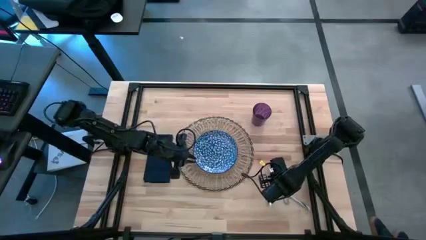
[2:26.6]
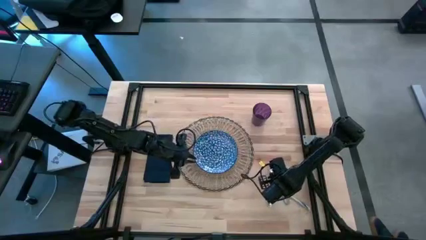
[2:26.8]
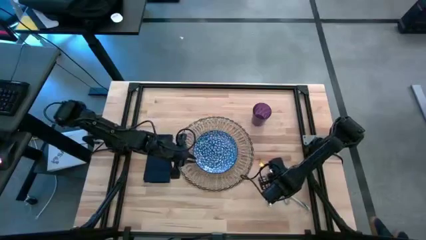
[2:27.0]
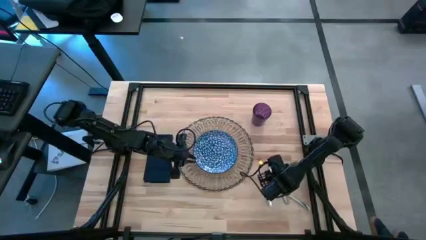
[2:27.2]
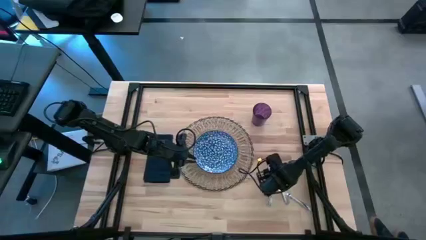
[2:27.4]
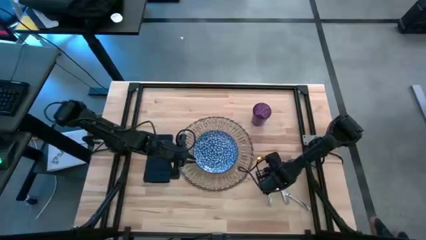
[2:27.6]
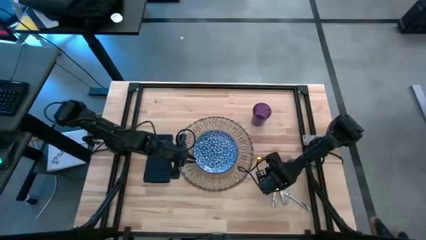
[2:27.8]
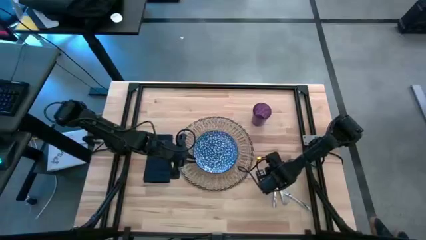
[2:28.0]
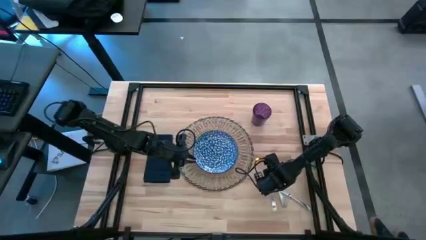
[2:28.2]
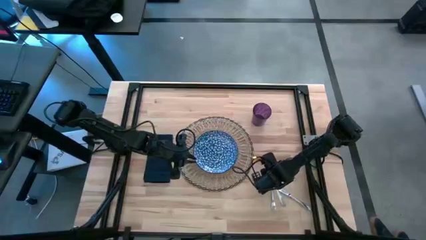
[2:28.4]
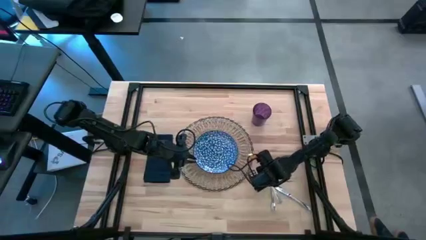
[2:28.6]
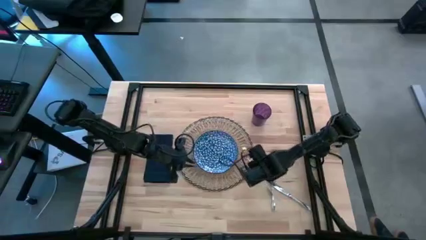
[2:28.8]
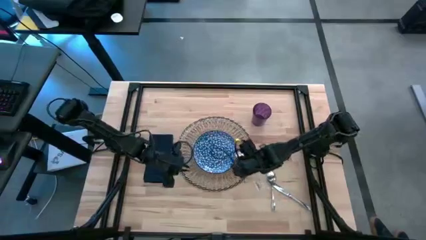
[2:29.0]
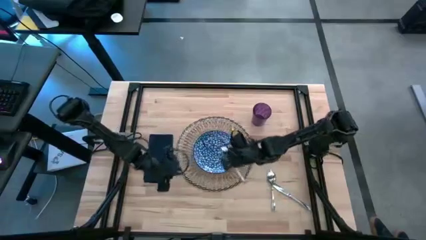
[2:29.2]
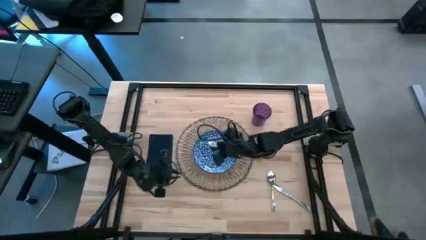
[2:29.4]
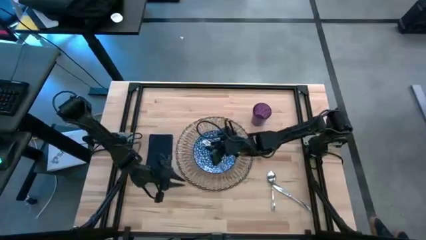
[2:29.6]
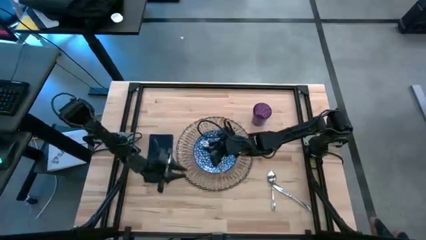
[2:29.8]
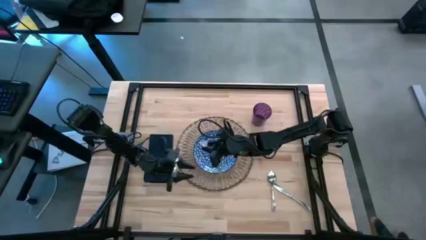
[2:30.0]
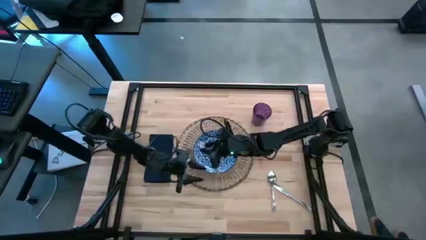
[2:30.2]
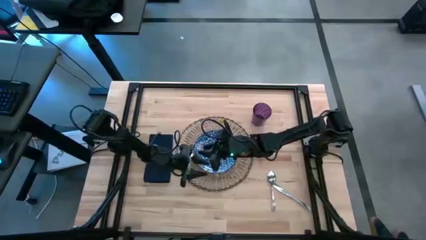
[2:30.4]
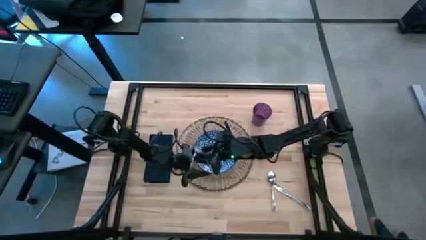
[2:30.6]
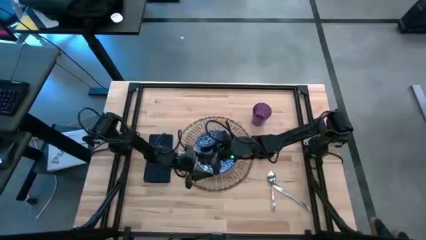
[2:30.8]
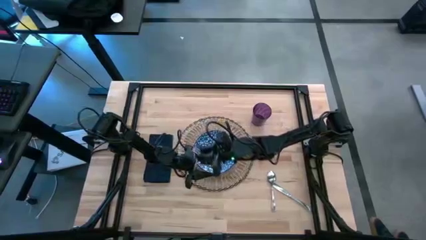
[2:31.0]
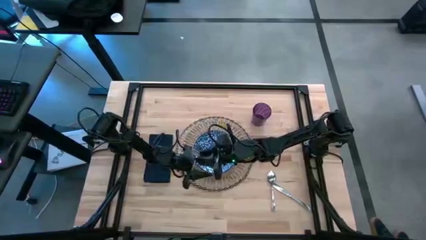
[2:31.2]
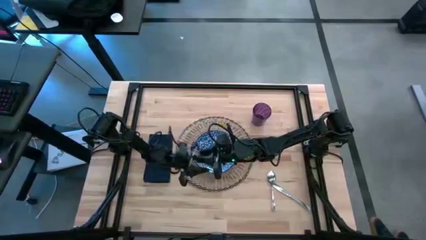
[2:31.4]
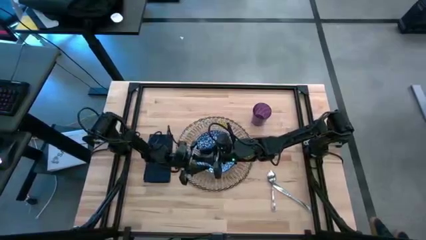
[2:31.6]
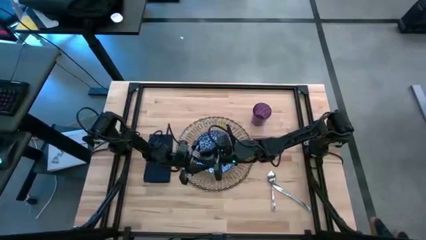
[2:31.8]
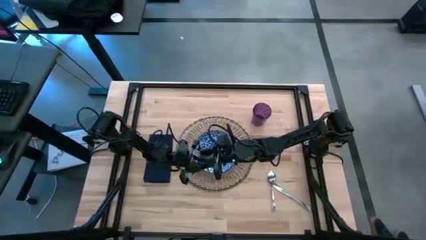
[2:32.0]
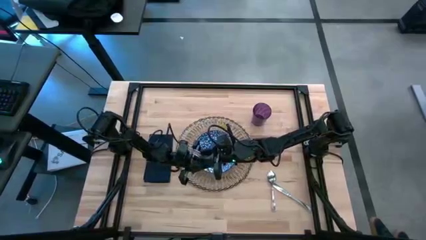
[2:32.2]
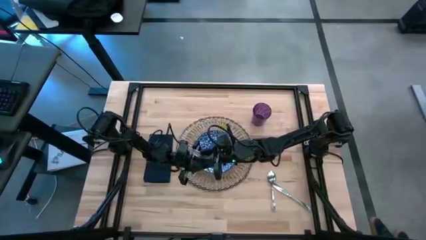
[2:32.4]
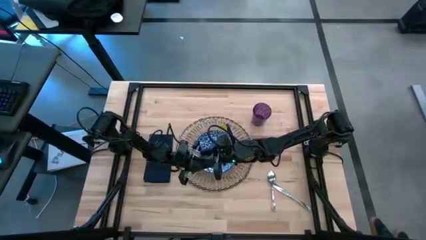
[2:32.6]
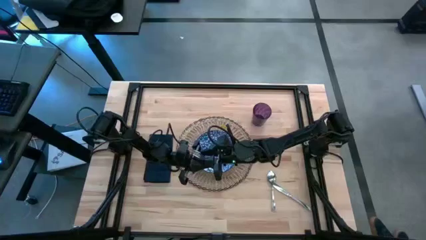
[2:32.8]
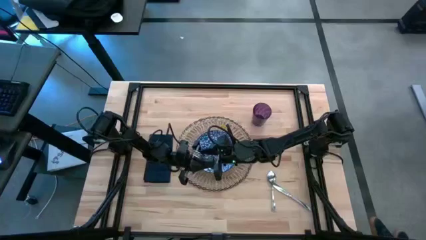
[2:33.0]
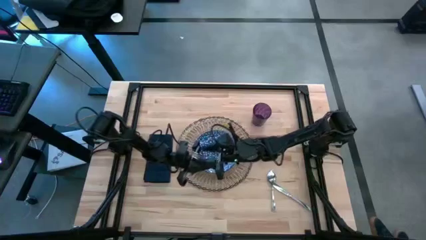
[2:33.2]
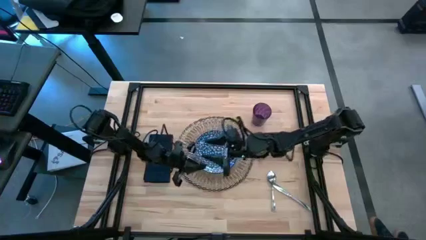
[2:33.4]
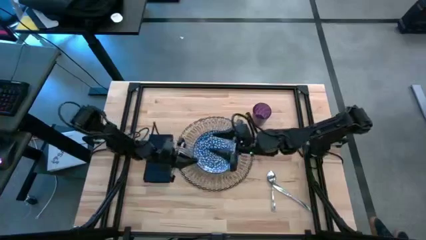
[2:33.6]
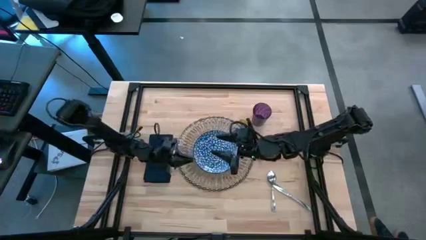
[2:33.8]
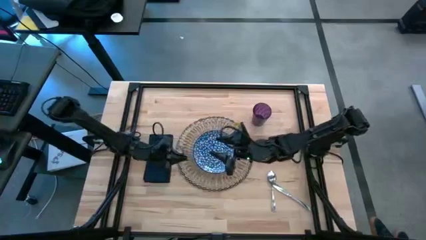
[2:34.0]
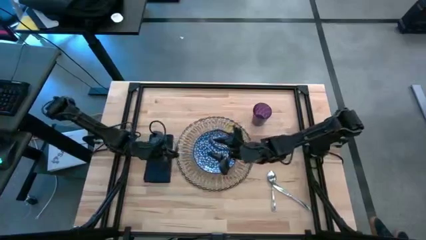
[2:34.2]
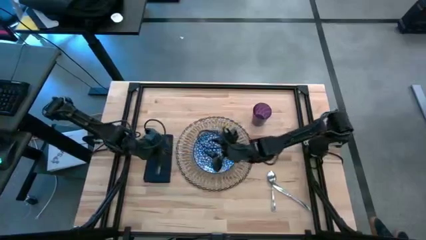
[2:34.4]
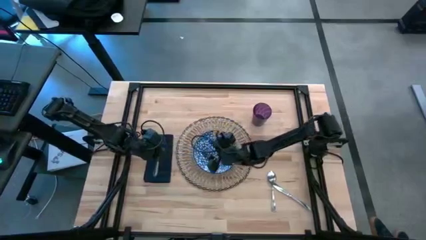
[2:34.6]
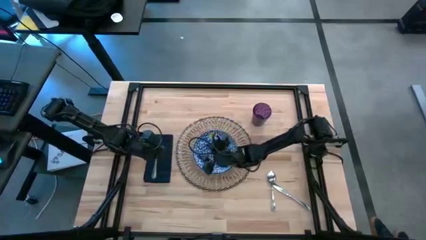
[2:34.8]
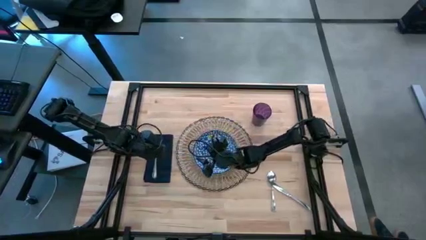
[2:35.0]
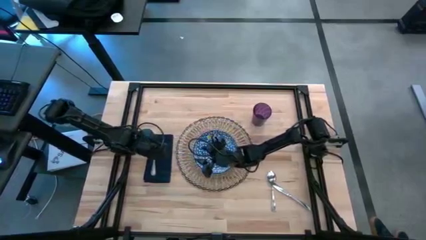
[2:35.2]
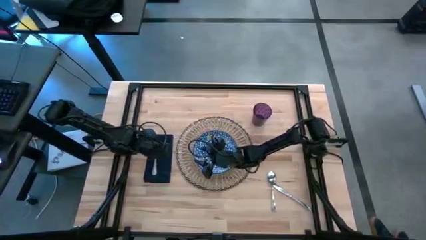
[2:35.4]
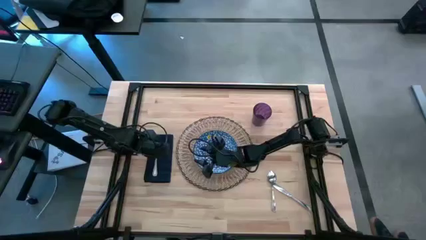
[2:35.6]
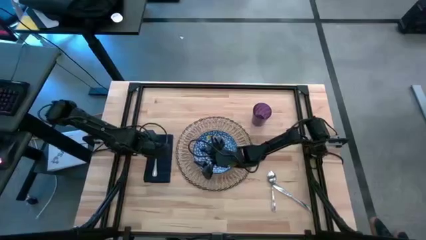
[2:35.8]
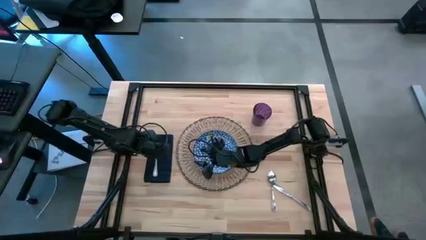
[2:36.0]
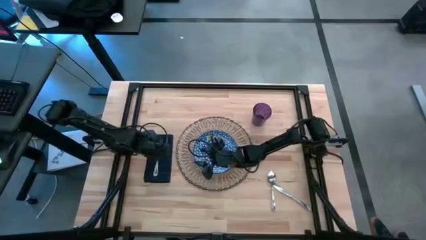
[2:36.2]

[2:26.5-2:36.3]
Task: Set table place
Put the silver fork on top of the blue table napkin

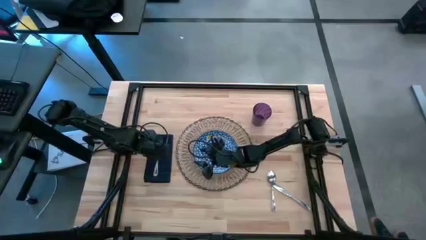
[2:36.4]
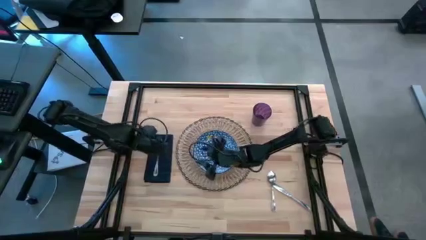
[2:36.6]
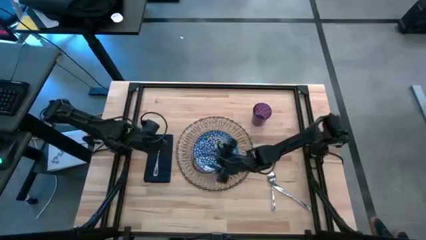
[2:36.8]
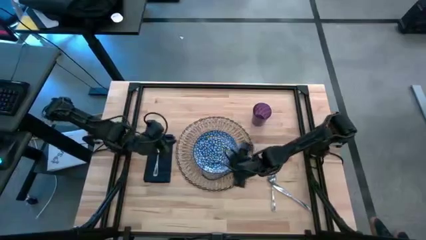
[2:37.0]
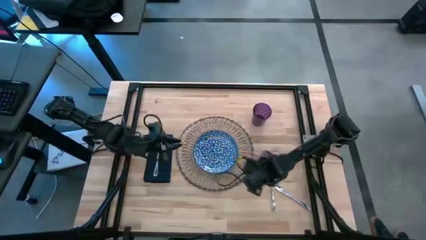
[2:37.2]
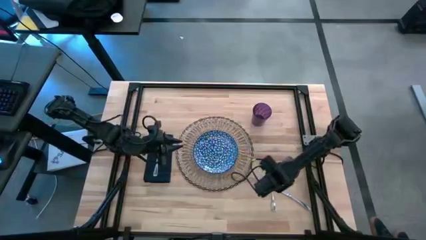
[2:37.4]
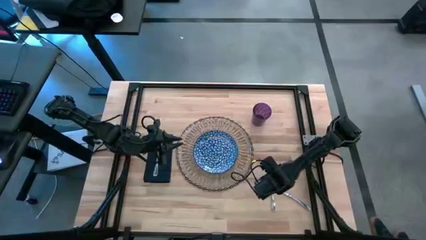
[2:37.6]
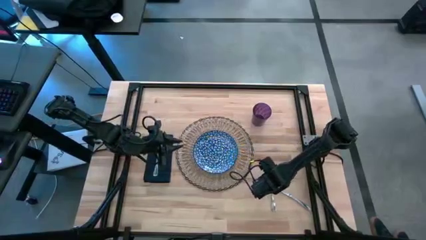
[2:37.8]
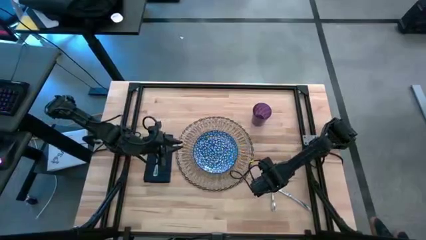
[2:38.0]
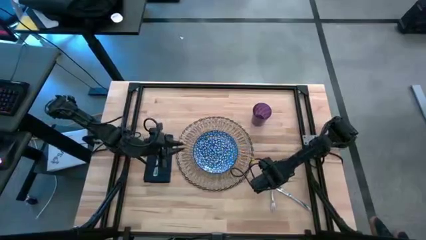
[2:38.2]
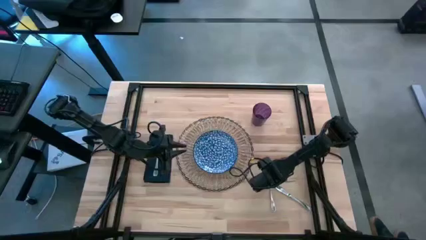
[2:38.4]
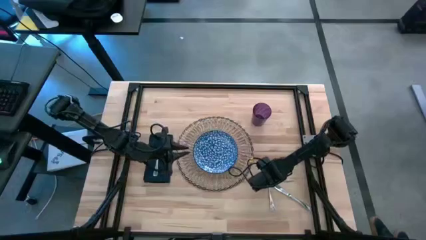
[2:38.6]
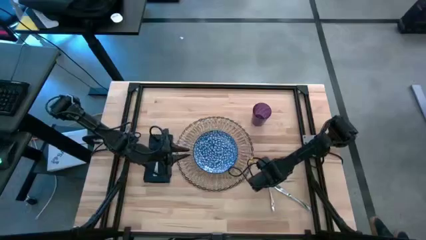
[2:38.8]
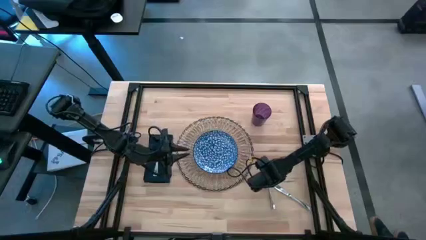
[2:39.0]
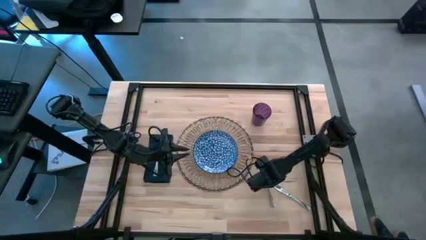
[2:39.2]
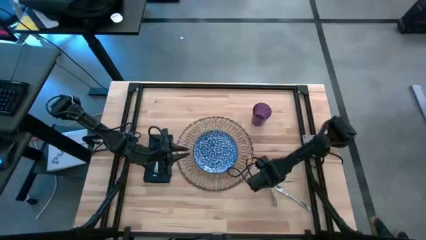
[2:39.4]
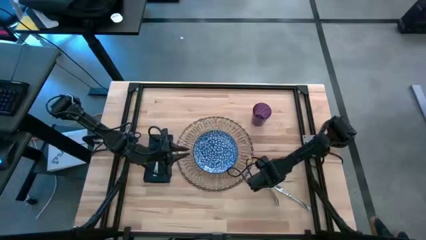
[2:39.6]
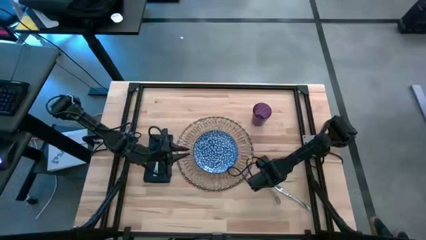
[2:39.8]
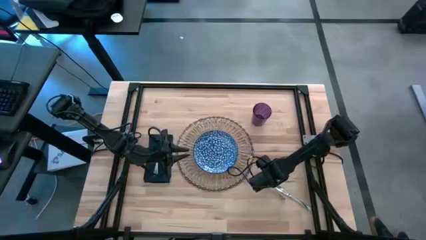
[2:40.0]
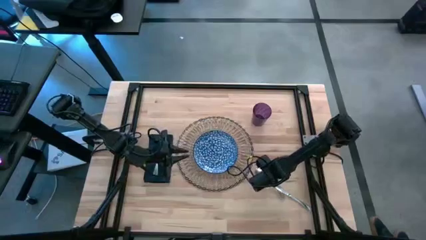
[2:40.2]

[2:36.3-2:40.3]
Move the silver spoon to the right of table mat on the table

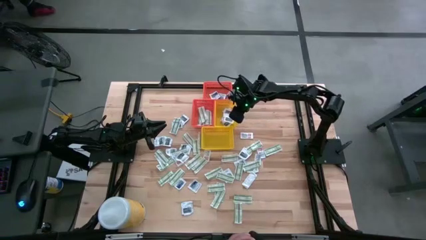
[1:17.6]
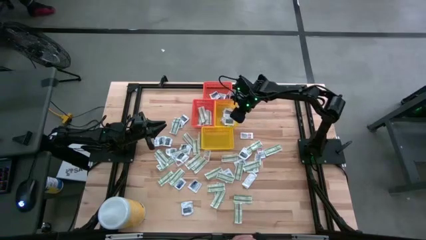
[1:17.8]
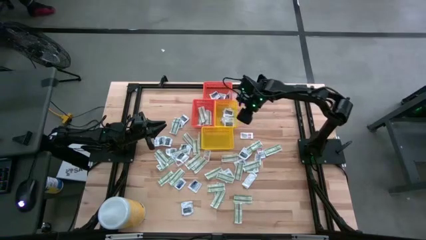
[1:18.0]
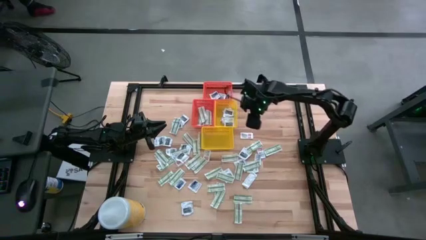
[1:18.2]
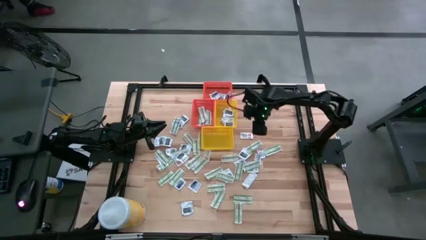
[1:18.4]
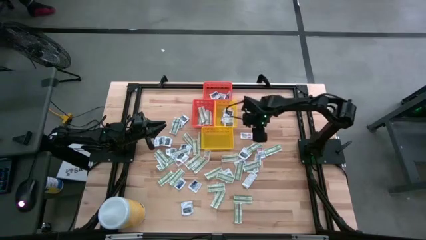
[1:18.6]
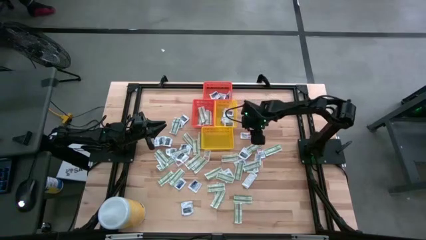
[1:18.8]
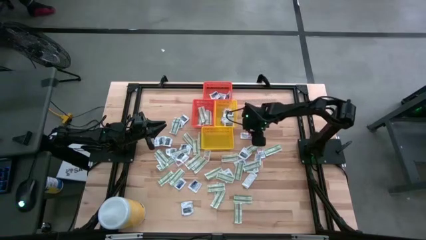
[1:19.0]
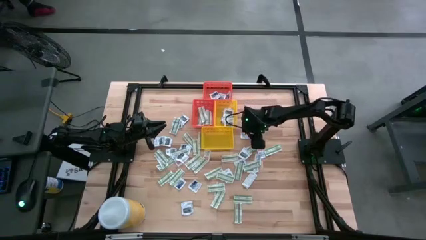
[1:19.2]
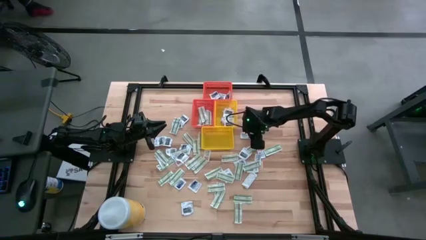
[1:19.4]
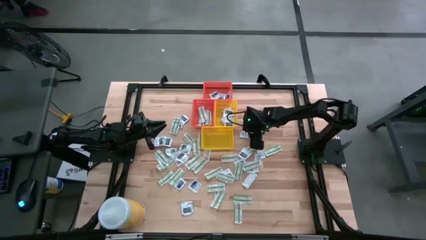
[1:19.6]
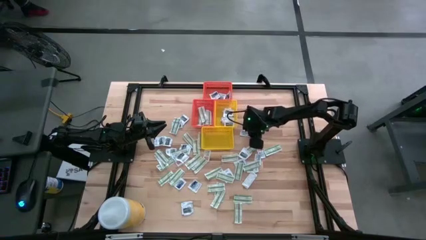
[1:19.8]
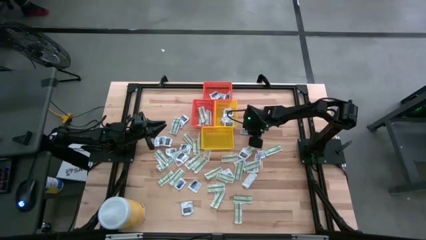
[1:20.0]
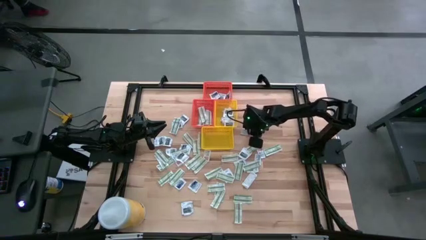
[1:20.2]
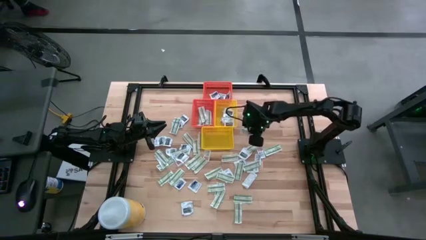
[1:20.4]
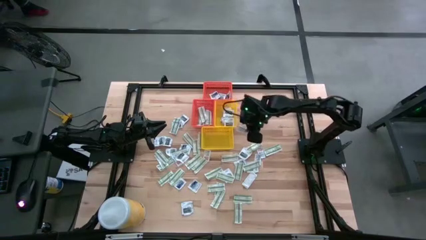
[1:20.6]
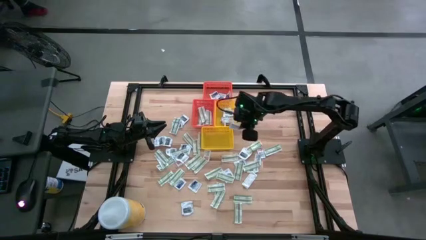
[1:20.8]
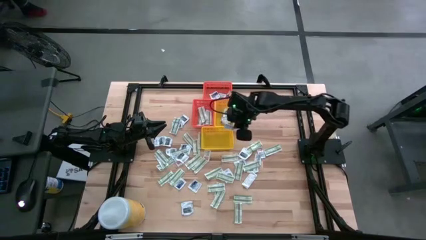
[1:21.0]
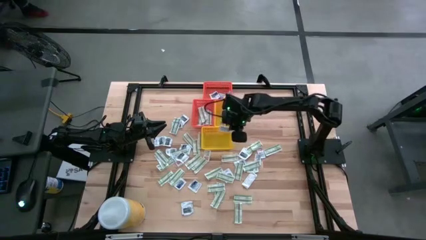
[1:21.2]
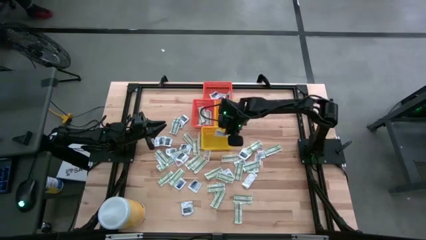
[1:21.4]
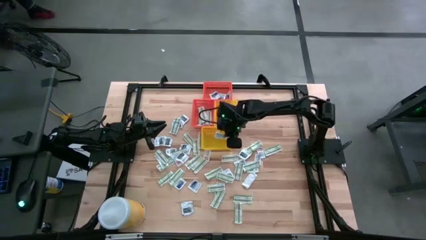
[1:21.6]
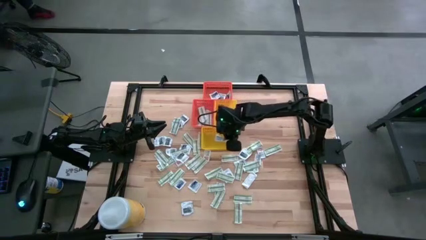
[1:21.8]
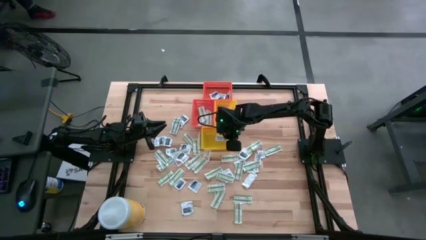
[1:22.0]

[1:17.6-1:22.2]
Task: Pick & Place First Aid Supplies
Put the ointment pack into the bottom yellow bin
